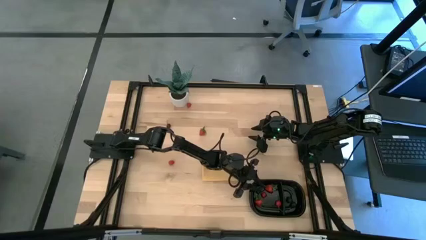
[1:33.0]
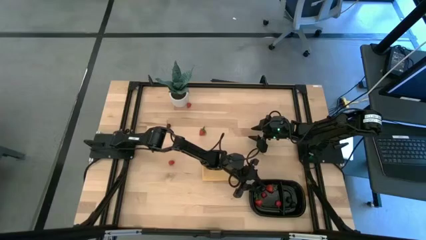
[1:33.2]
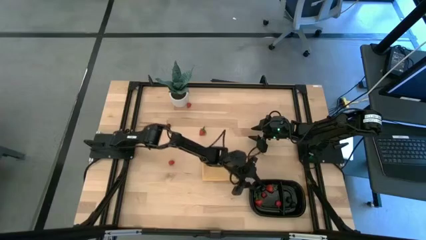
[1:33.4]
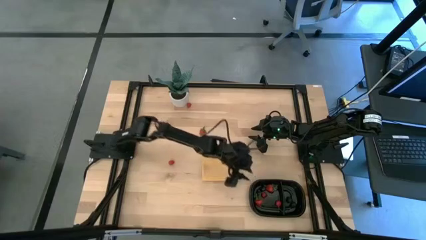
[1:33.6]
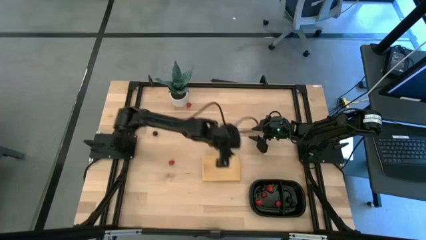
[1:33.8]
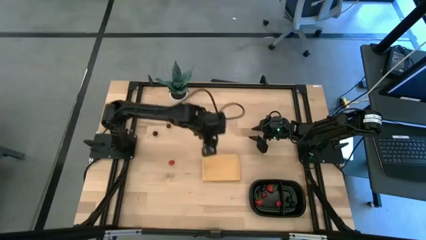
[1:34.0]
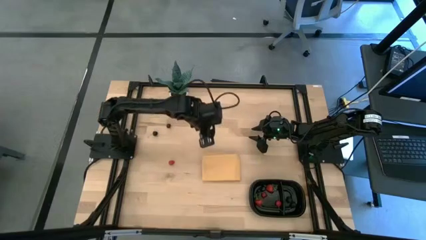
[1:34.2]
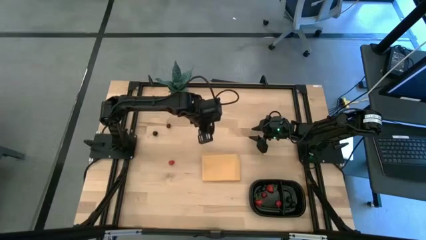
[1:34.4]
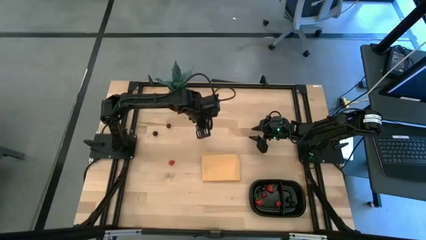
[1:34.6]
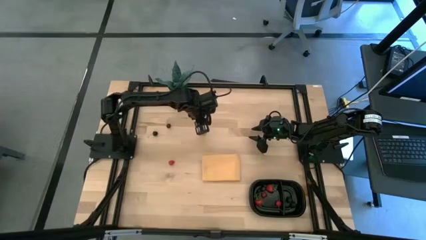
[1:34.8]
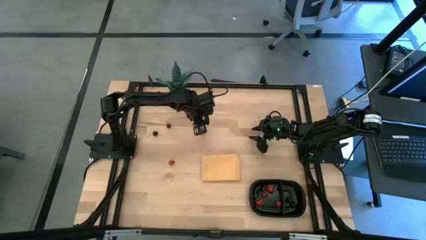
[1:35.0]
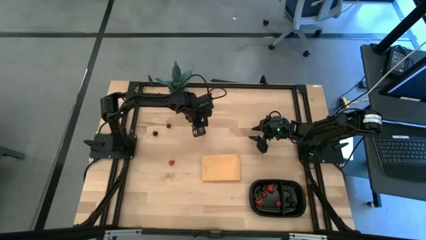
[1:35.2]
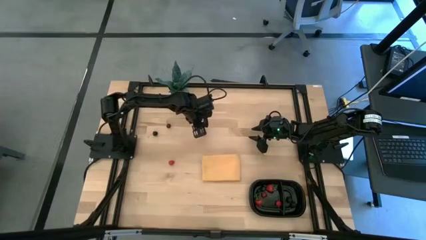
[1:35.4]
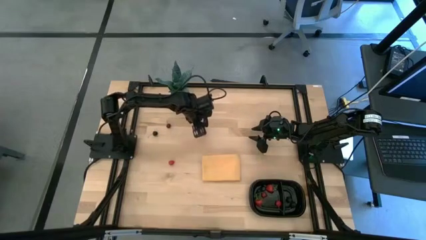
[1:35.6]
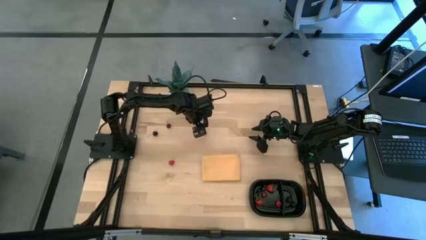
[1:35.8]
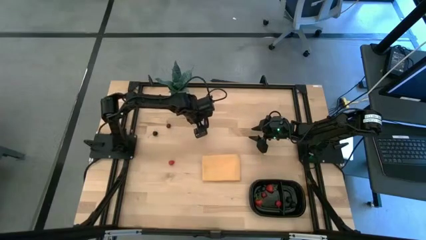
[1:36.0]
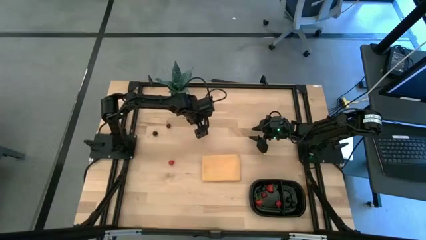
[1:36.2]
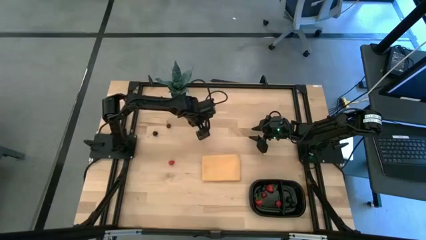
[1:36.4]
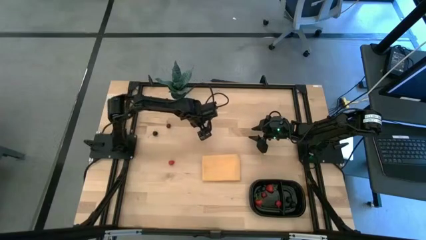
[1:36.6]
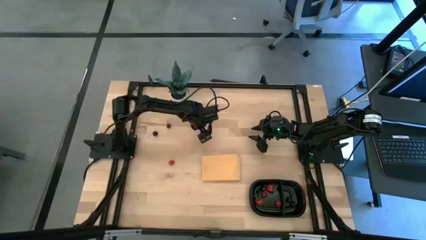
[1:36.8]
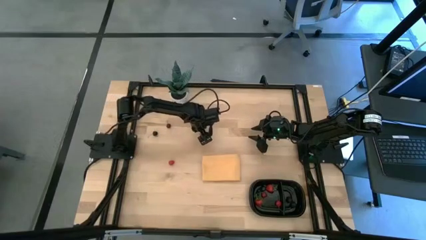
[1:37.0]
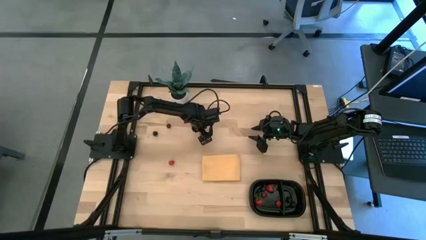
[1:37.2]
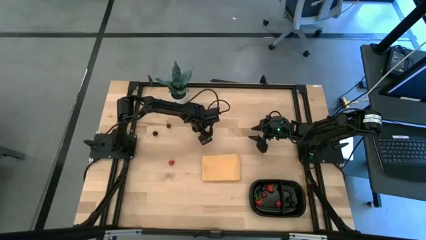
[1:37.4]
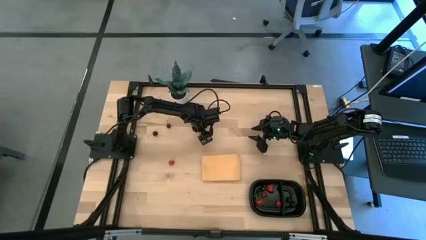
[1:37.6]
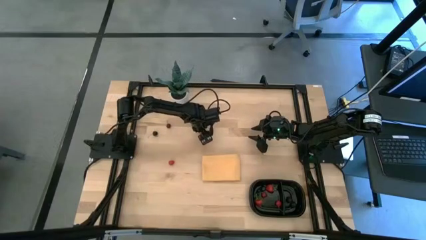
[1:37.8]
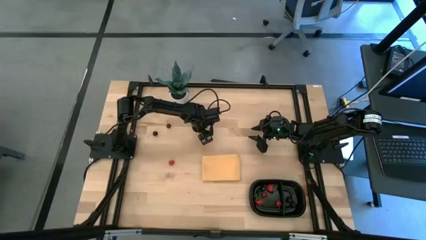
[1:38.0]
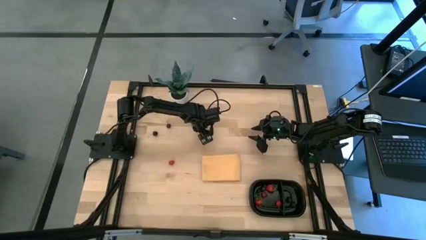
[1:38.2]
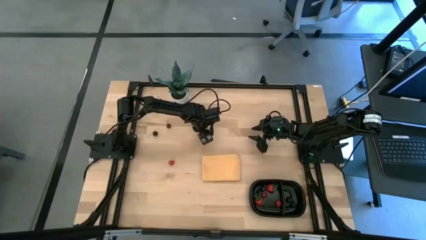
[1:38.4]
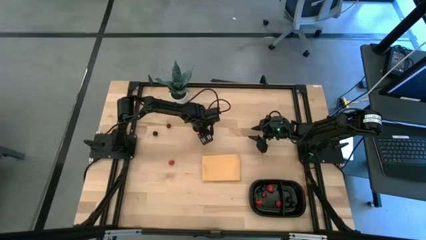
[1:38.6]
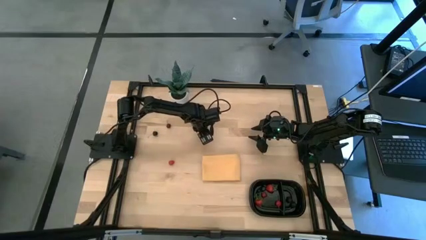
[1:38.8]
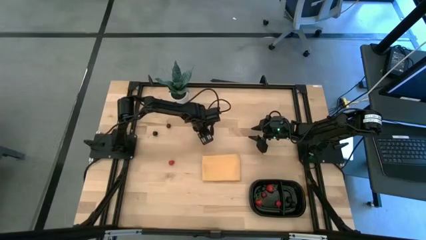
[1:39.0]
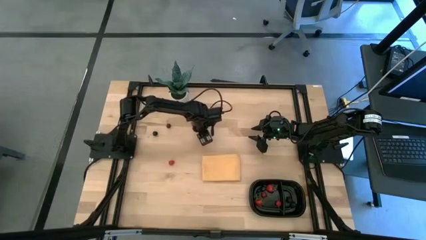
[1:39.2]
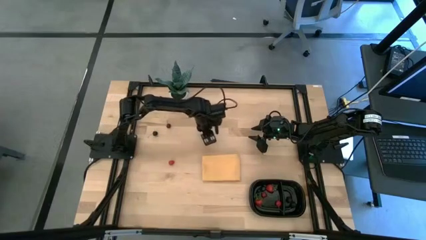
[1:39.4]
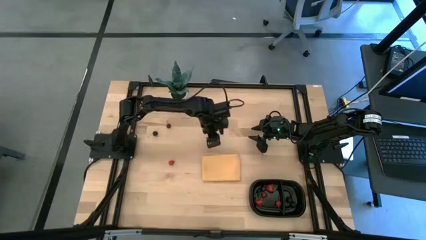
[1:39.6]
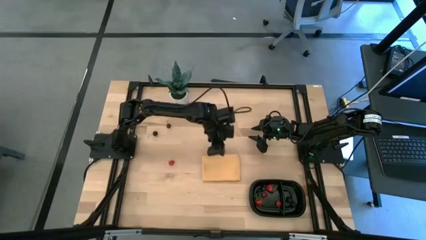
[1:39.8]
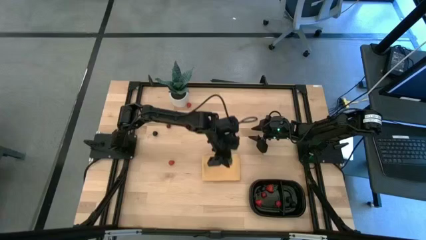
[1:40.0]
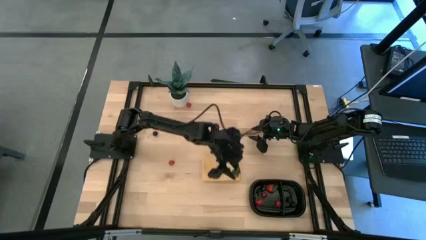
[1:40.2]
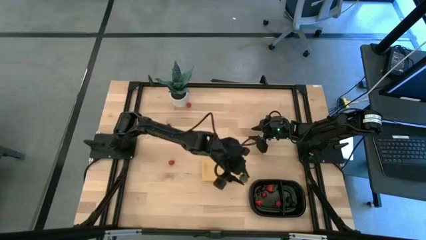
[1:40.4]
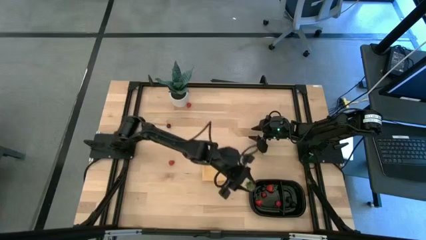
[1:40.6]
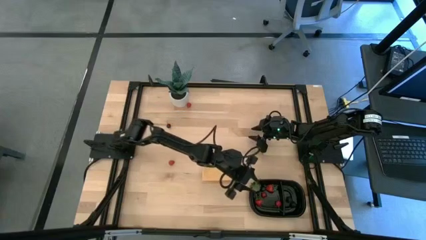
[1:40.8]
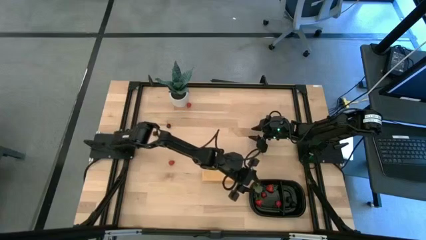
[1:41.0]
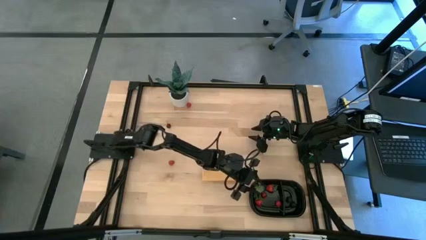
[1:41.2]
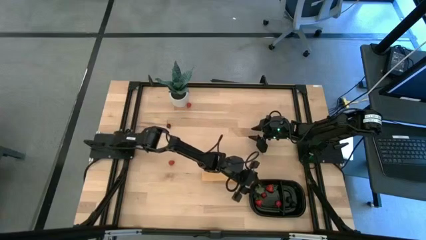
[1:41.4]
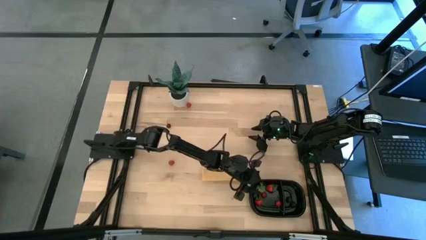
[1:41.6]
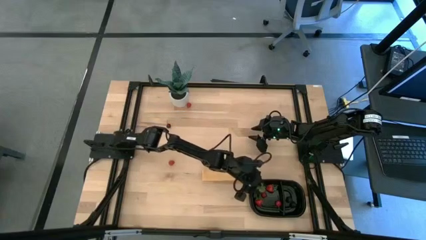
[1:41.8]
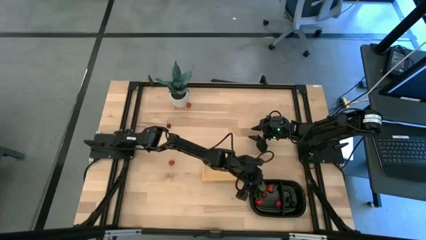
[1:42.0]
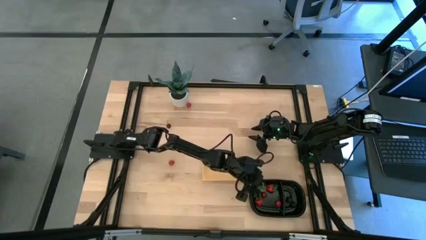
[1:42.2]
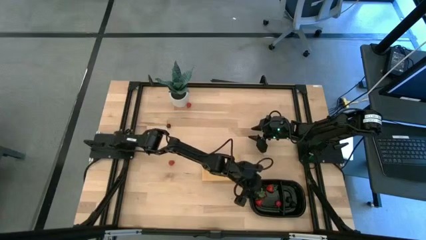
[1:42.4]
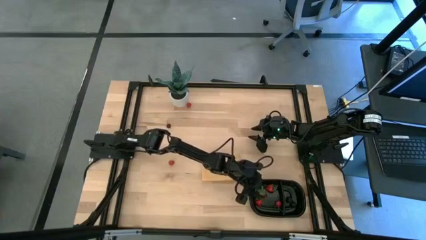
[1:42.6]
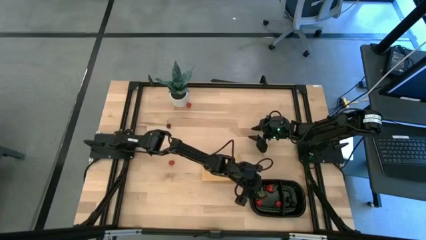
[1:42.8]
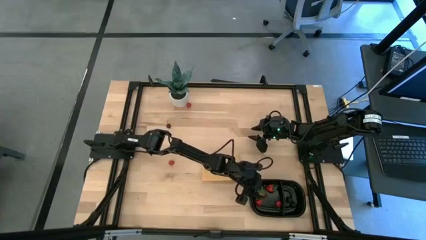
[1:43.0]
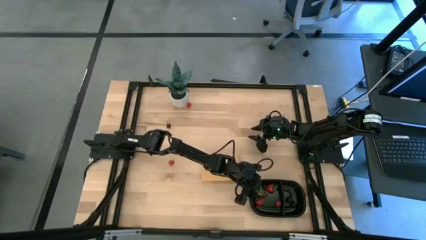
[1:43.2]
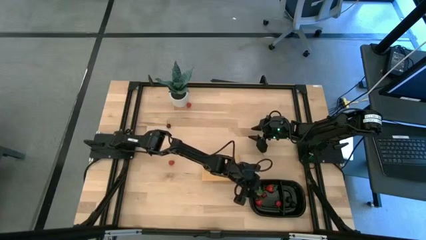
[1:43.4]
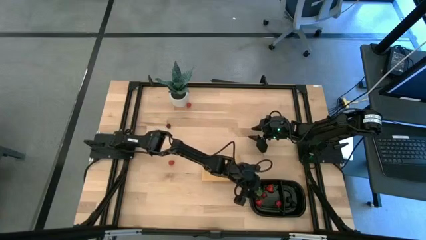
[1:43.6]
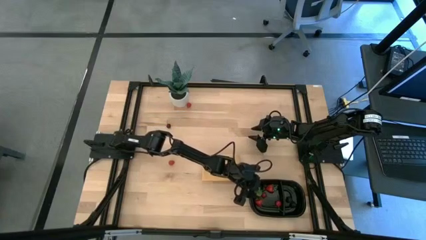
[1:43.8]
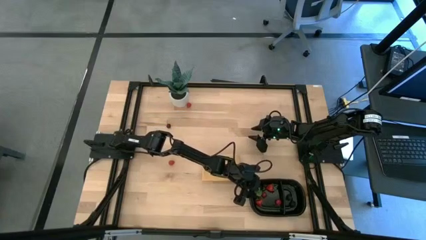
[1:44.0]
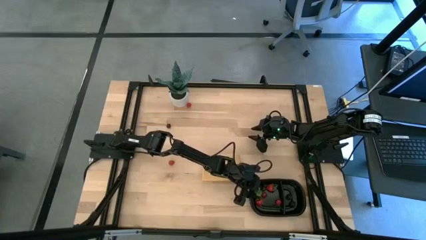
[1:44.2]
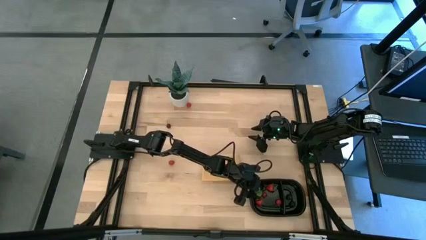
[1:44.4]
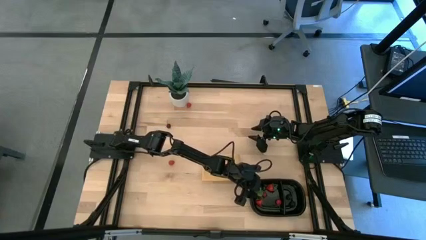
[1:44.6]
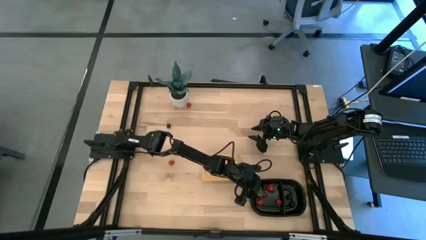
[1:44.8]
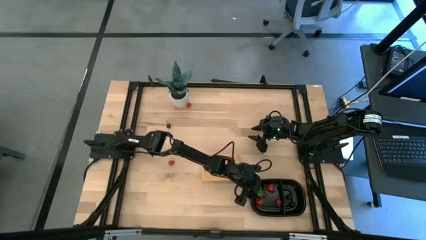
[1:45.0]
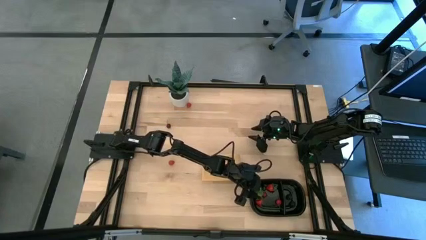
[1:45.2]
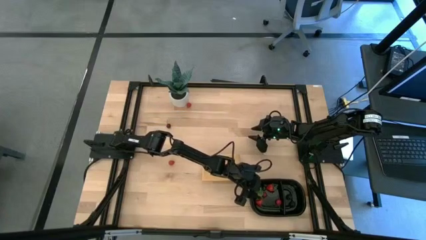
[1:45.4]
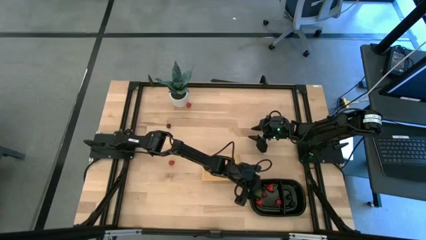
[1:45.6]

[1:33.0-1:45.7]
Task: Pick and placing Produce into tupperware
Put the red strawberry into the black container
